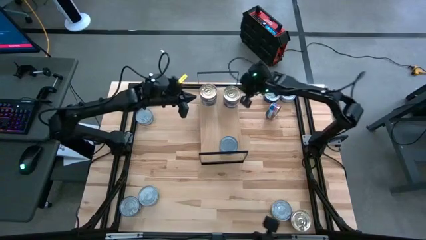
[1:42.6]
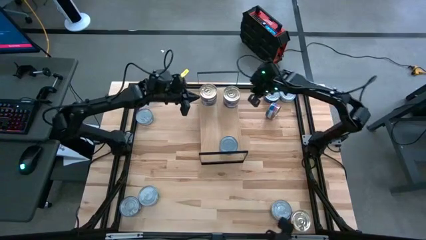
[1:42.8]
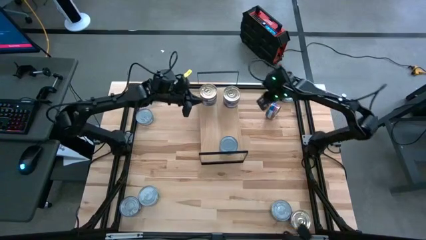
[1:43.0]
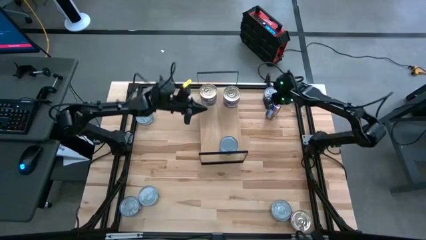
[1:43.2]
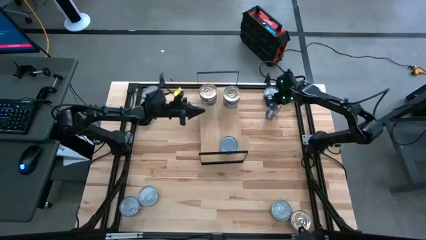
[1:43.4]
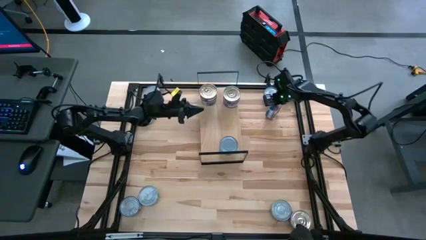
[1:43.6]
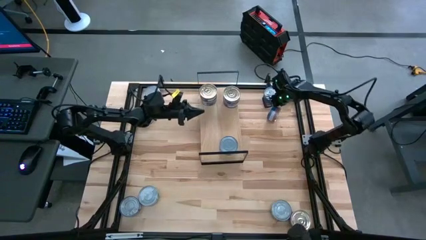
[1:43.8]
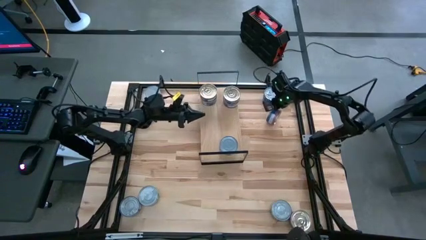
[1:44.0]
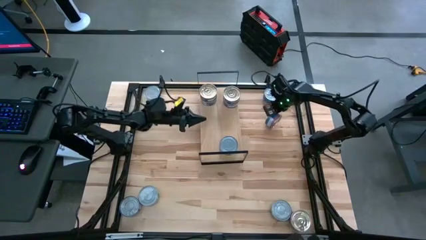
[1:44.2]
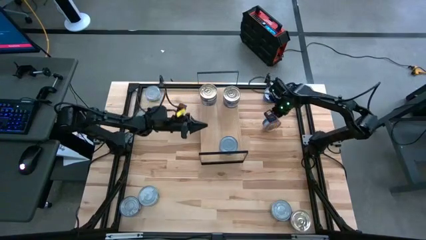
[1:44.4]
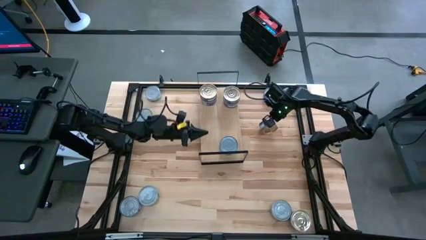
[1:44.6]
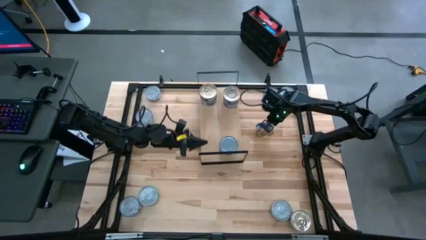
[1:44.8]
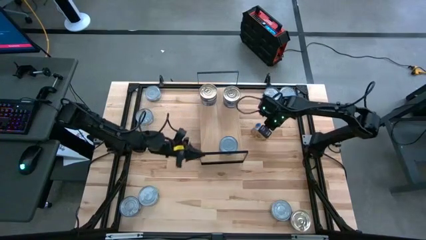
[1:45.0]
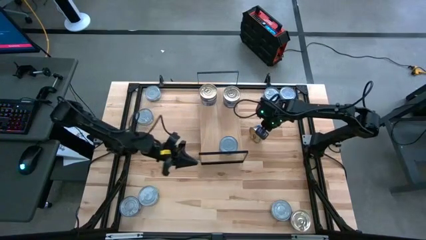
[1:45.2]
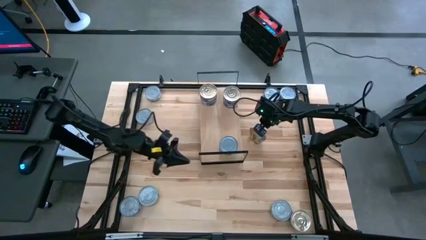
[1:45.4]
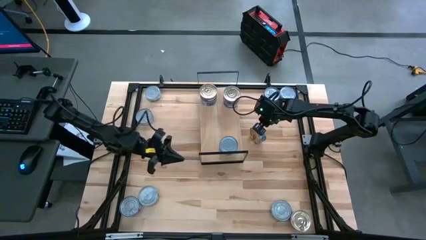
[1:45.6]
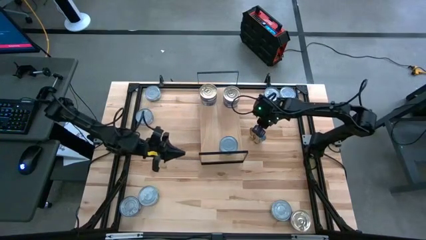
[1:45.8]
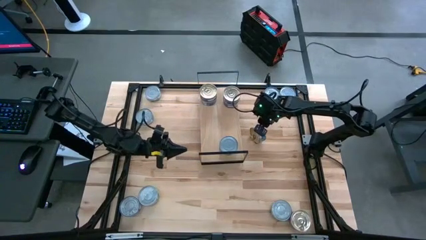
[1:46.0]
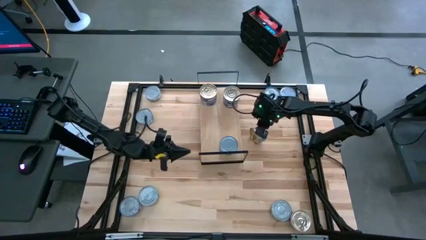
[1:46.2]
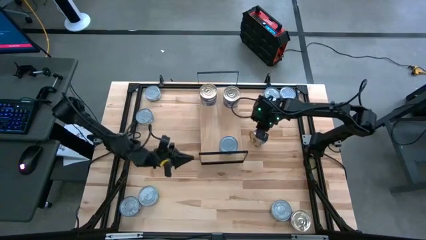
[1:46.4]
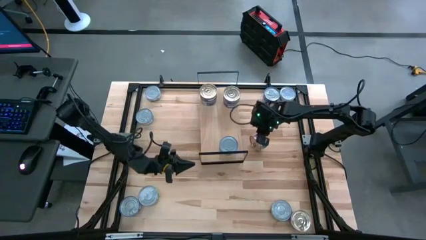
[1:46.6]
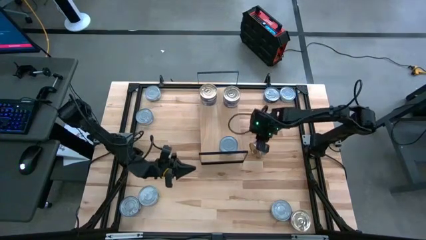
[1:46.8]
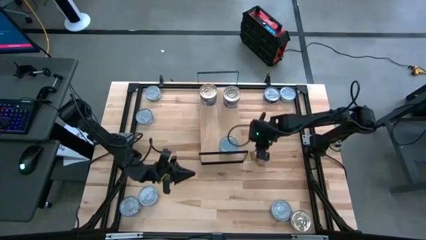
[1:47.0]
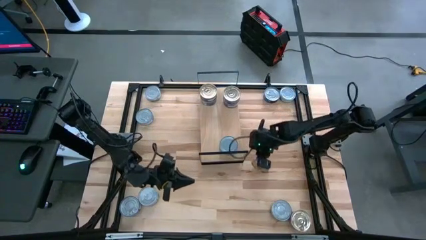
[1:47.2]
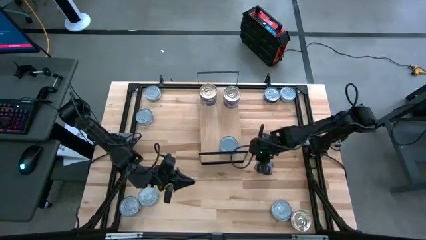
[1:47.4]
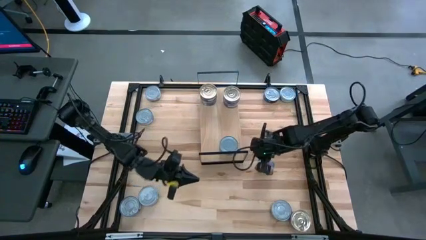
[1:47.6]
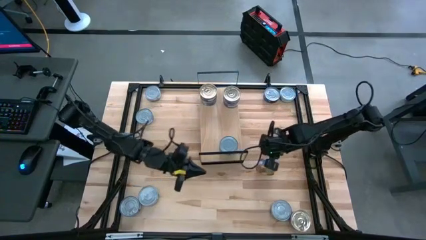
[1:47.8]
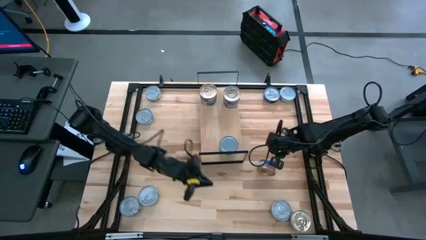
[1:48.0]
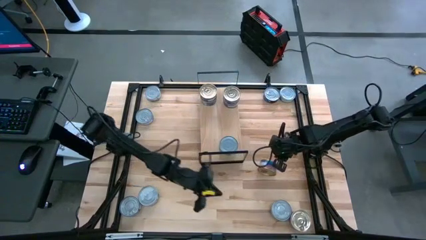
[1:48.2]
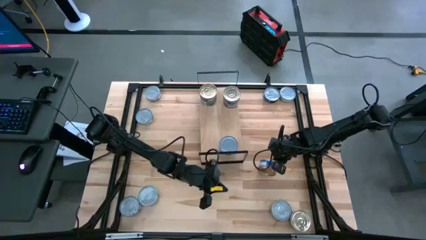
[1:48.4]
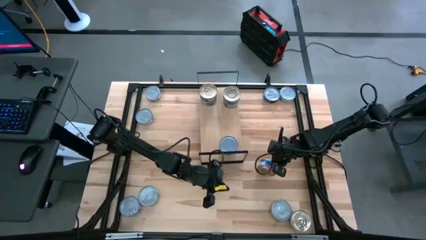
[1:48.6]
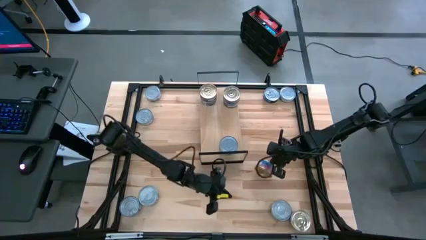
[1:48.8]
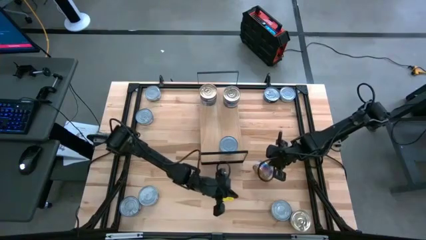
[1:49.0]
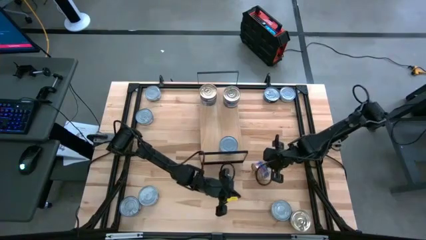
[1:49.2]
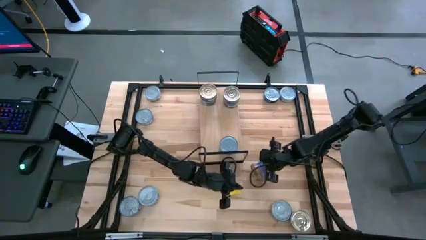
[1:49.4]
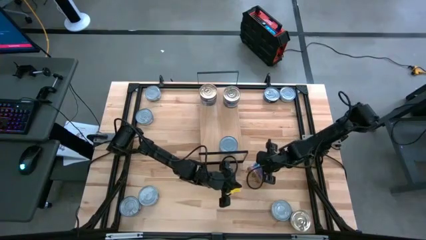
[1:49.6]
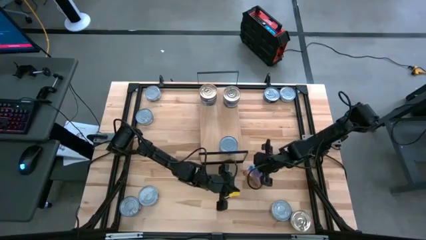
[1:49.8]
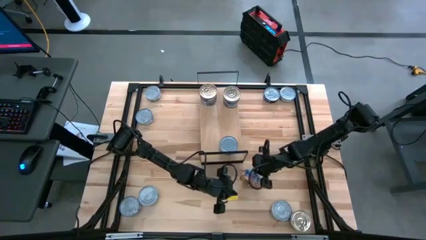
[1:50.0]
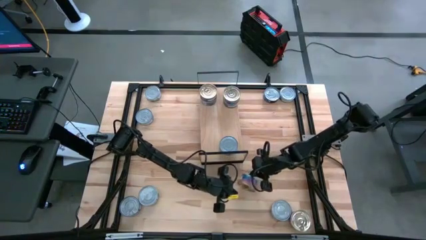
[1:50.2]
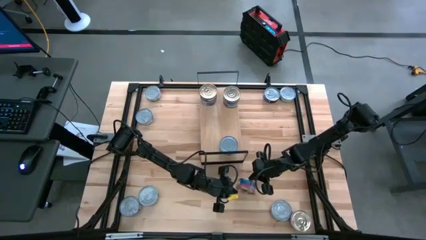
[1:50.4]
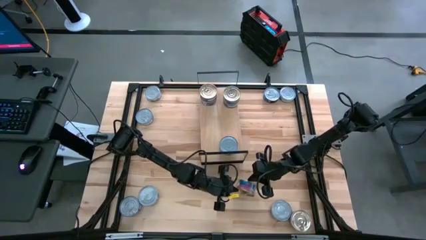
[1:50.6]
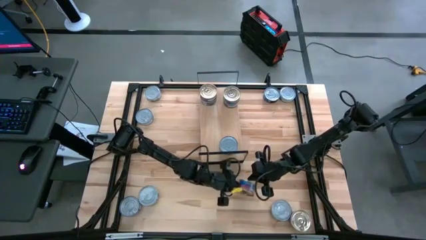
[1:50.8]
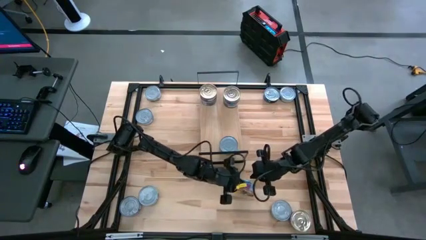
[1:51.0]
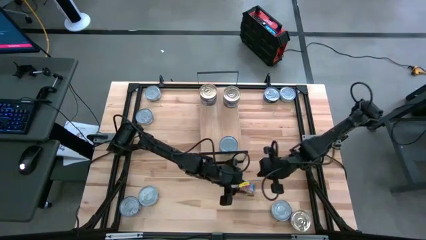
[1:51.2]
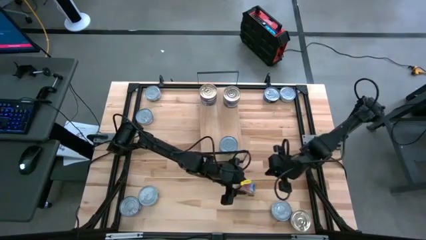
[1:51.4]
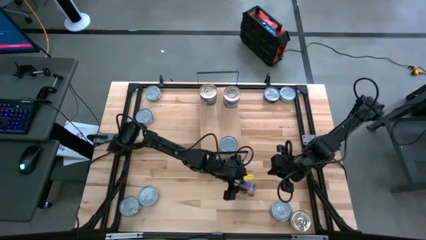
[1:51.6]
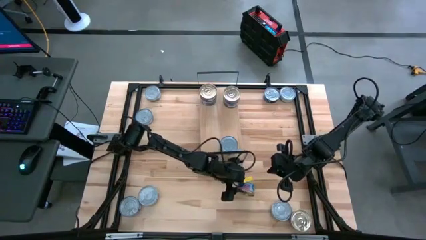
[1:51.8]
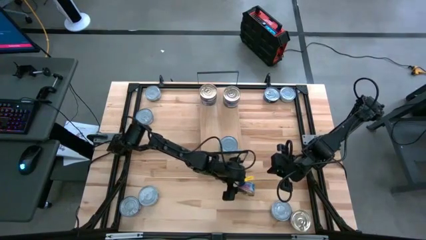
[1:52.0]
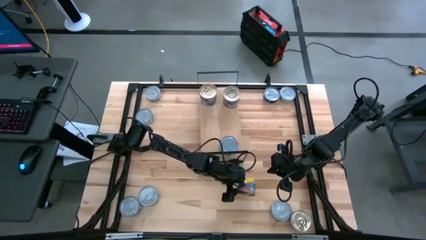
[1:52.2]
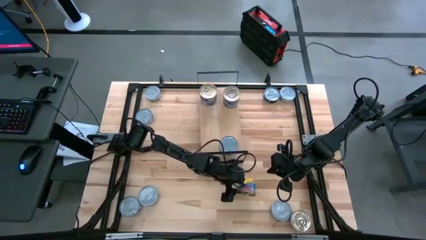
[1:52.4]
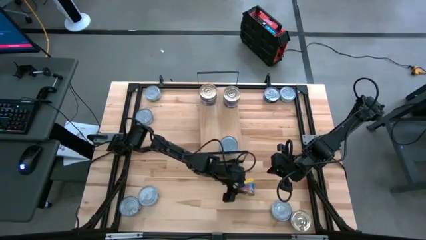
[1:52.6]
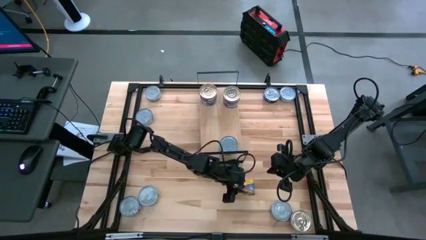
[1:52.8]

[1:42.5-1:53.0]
Task: Stack canned seafood by type on shelf
Stack the blue pink tuna can on top of the other blue pink tuna cans on the shelf
